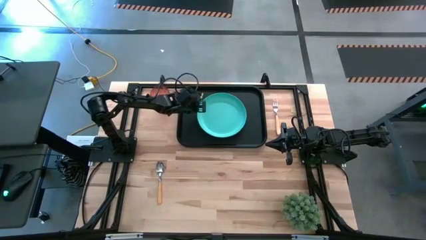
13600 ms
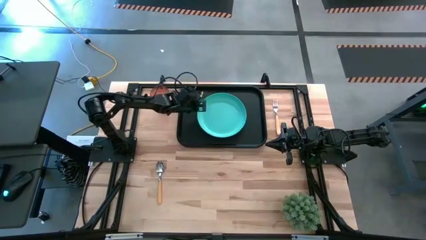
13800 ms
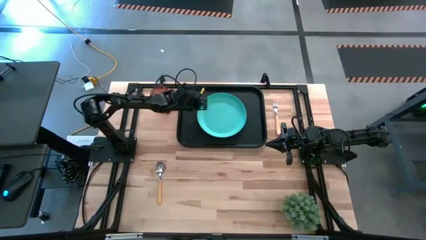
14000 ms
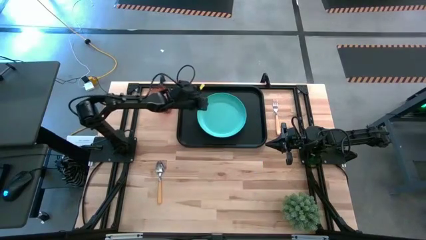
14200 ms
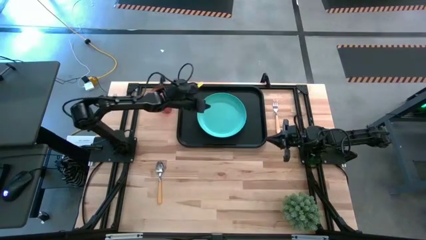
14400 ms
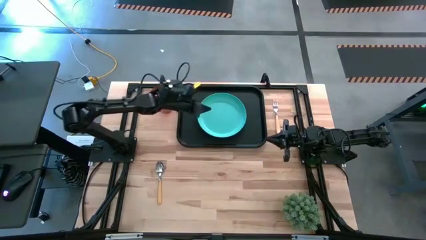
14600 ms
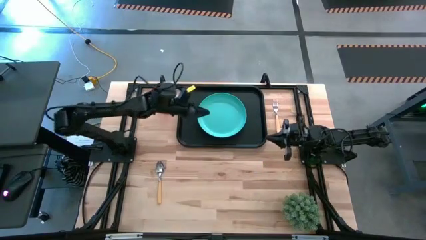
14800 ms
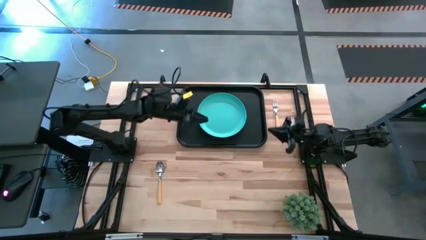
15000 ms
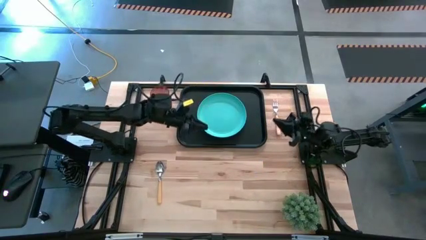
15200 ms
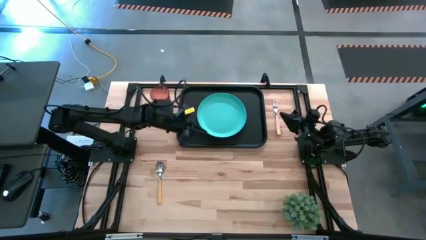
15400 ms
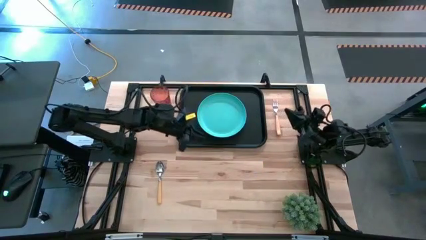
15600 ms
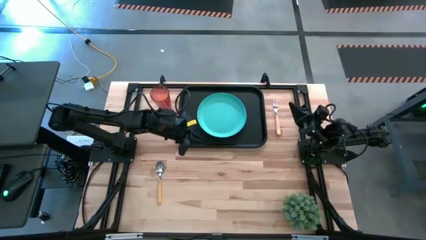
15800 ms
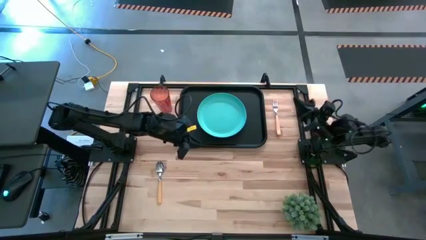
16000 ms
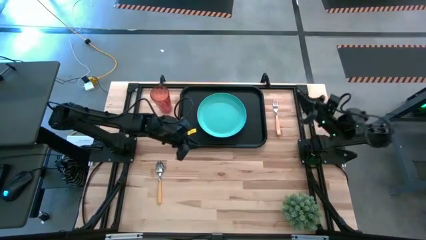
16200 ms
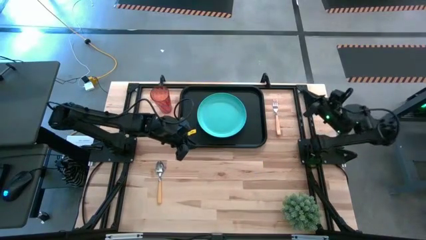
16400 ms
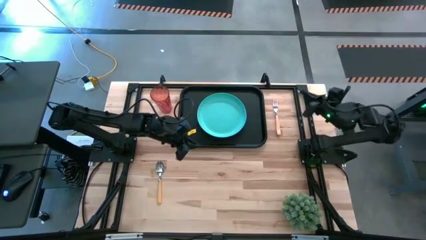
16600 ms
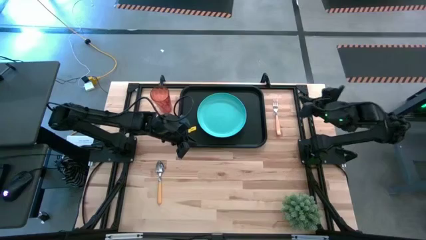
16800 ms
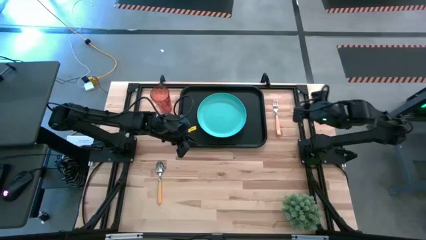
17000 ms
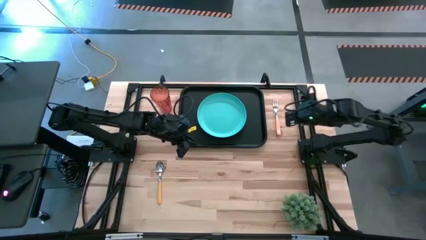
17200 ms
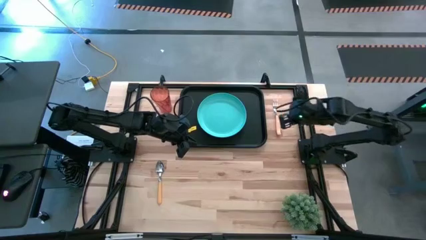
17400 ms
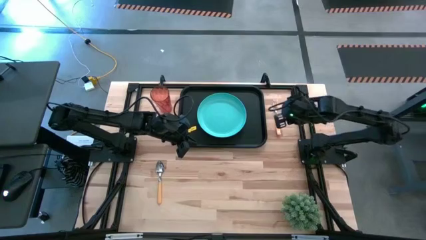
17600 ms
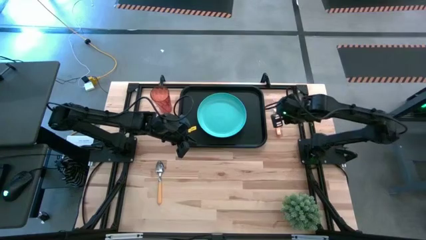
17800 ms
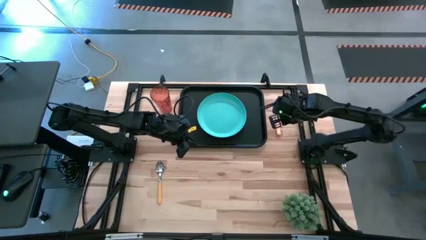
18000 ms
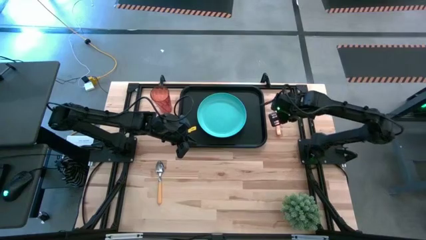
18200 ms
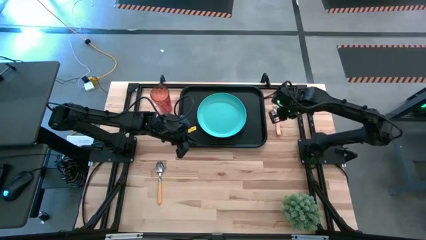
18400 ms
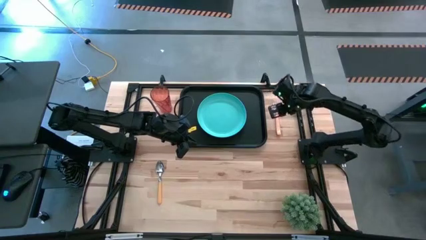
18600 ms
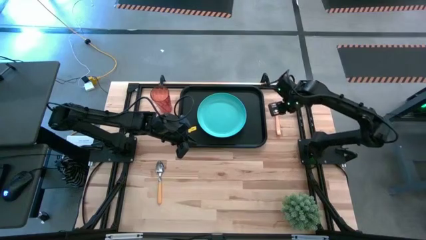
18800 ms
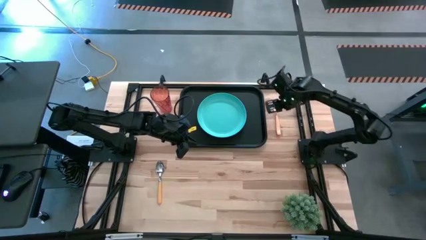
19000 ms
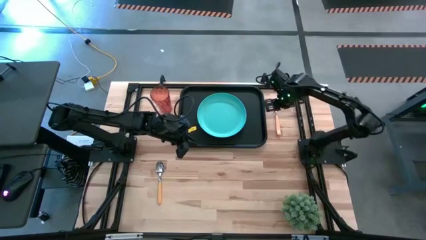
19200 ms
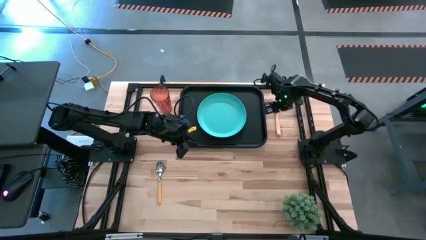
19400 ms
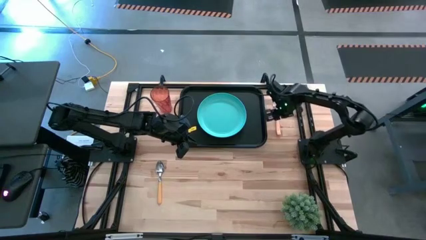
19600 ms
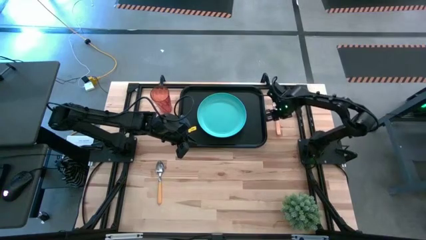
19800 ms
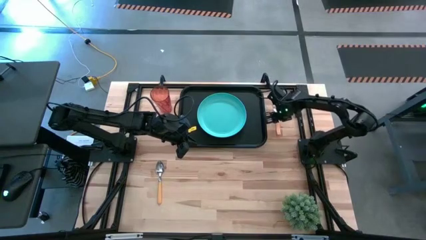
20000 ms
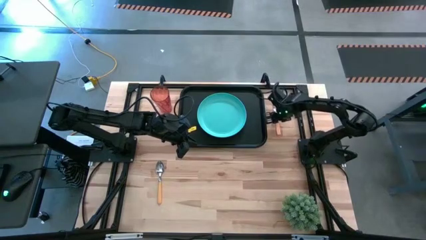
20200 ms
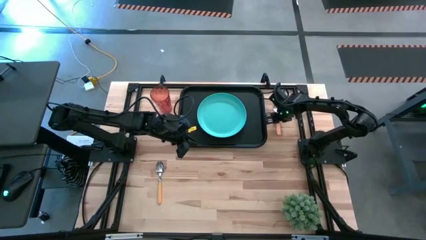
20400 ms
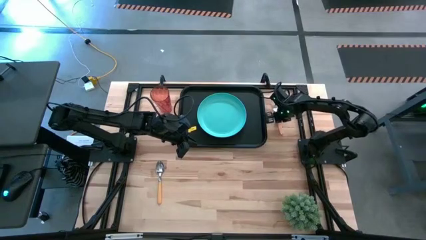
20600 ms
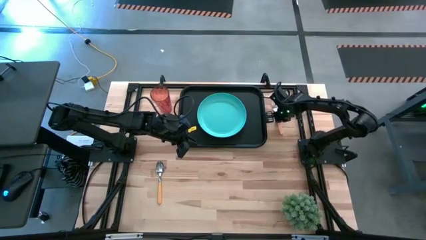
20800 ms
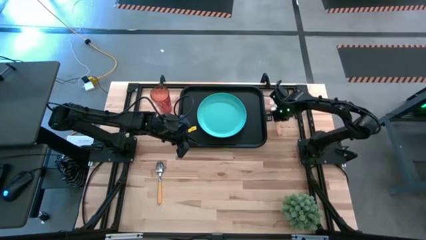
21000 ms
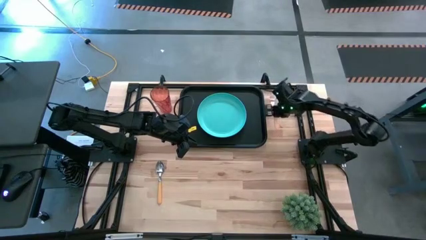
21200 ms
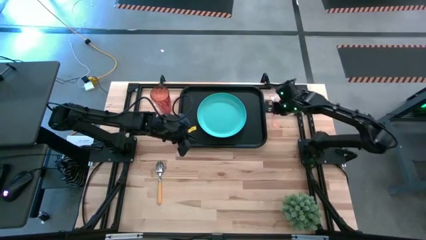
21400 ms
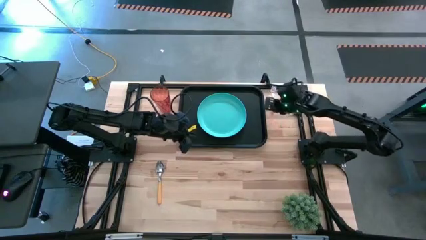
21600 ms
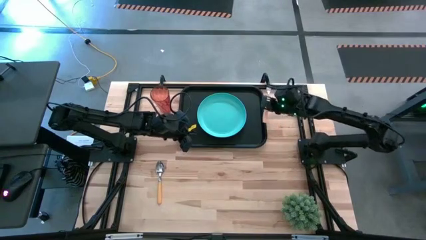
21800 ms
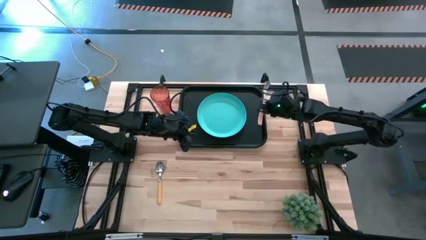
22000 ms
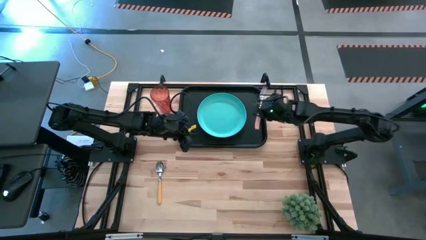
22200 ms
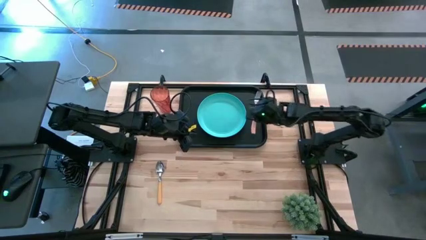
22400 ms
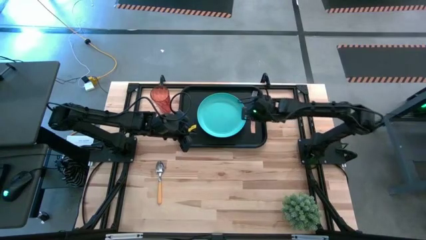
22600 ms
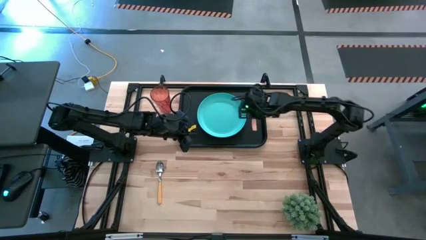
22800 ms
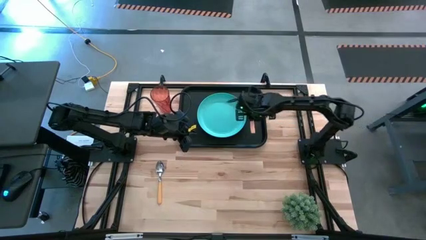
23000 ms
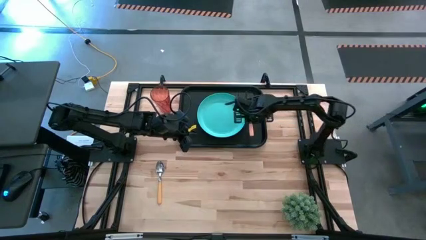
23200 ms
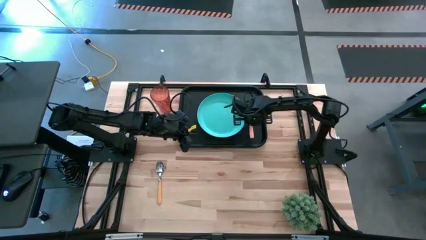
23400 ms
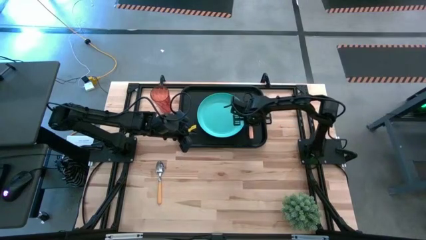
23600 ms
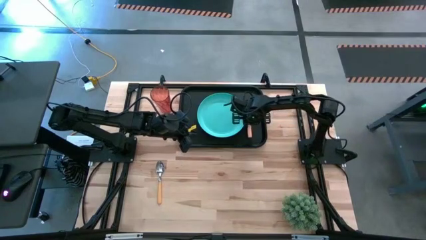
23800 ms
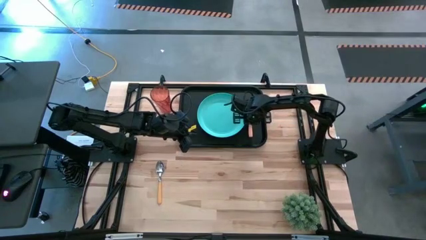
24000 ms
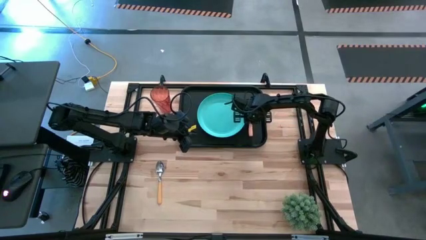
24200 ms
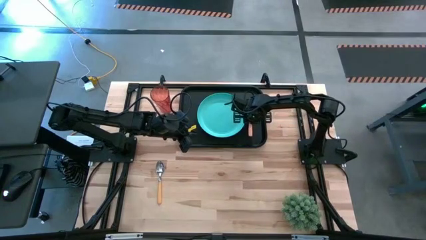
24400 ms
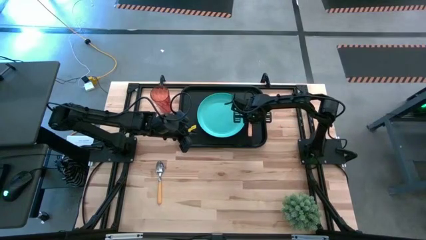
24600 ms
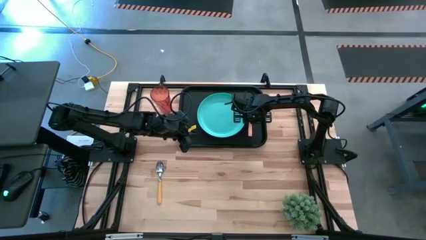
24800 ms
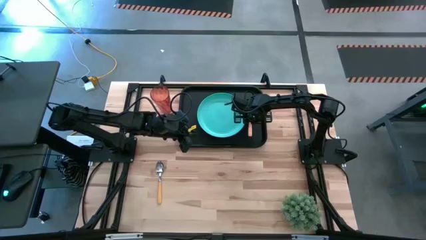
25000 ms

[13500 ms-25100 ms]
Task: Pick and place plate/cup/fork/spoon on tray
Put the orange fork on the black serving tray to the right of the blue plate

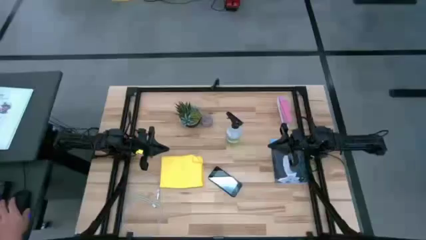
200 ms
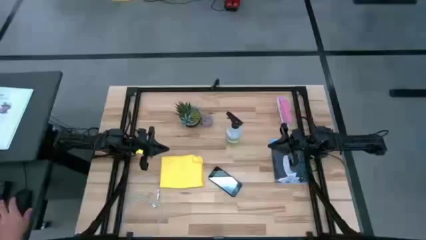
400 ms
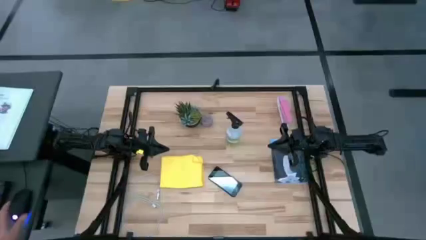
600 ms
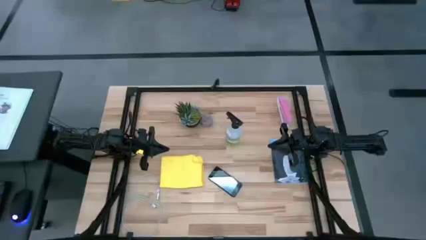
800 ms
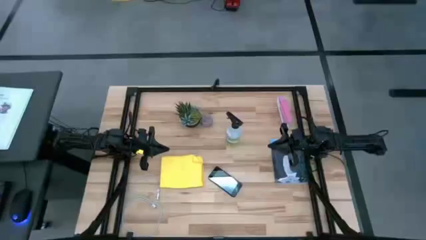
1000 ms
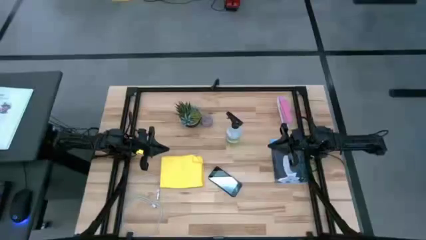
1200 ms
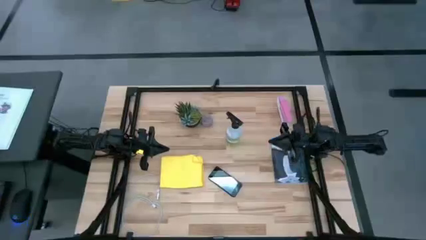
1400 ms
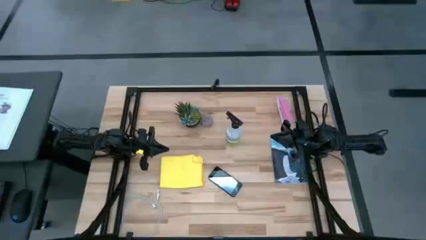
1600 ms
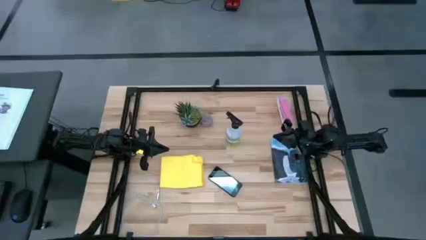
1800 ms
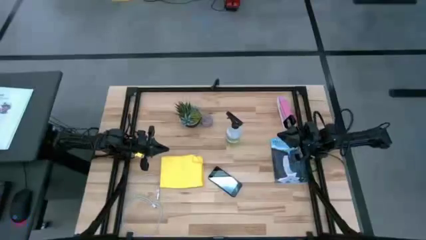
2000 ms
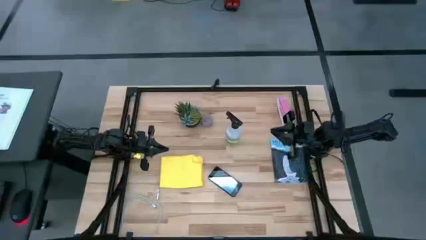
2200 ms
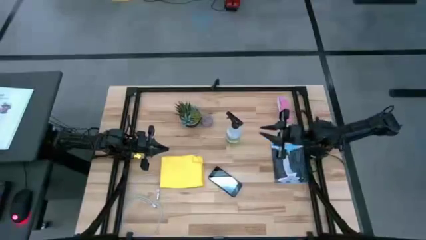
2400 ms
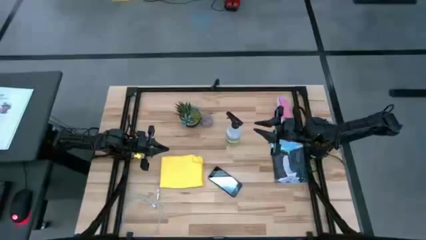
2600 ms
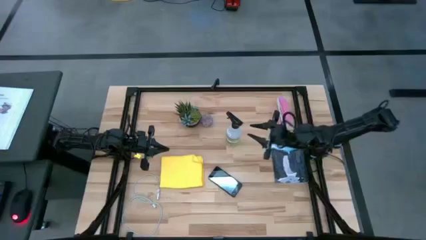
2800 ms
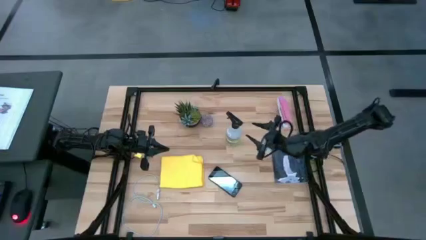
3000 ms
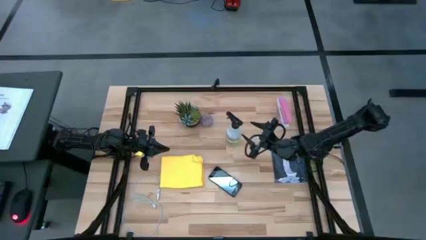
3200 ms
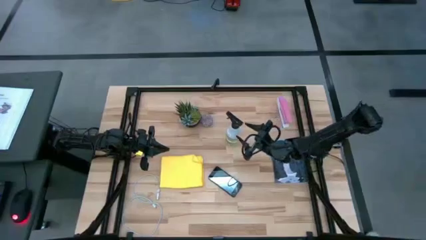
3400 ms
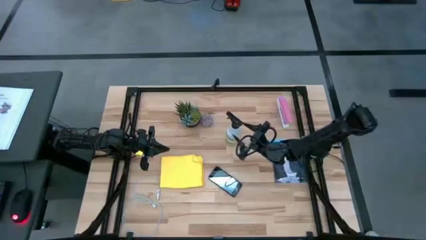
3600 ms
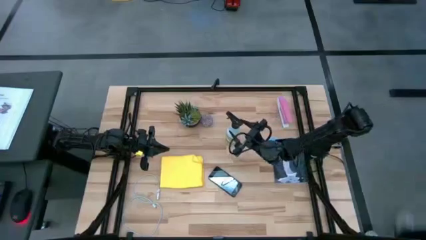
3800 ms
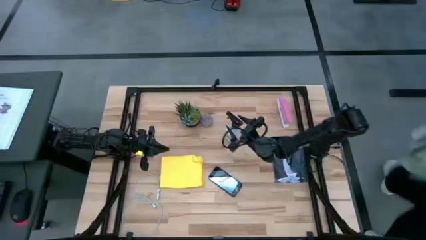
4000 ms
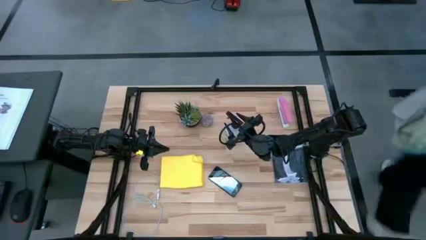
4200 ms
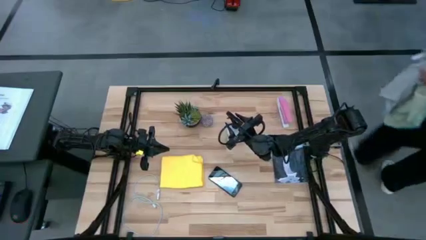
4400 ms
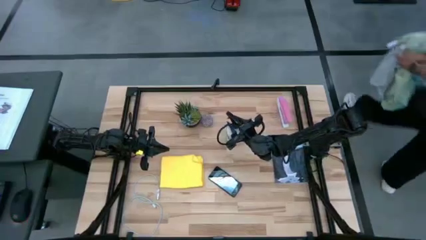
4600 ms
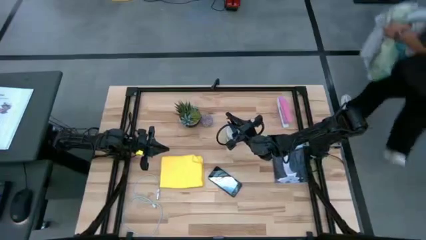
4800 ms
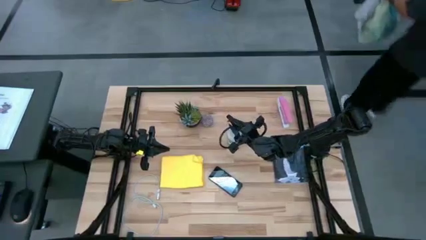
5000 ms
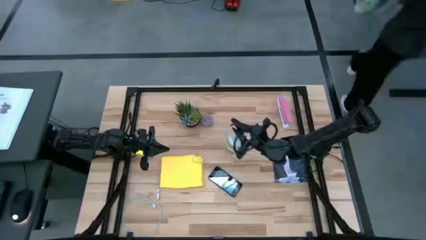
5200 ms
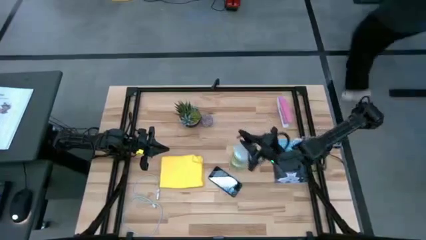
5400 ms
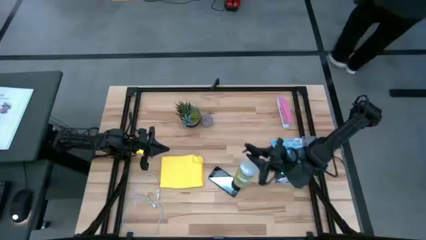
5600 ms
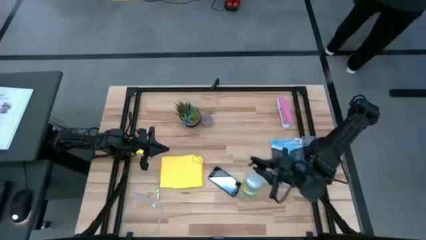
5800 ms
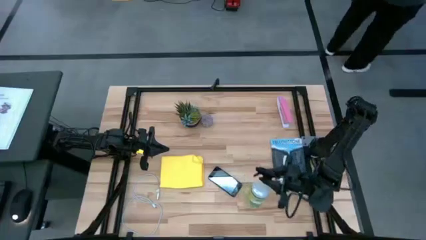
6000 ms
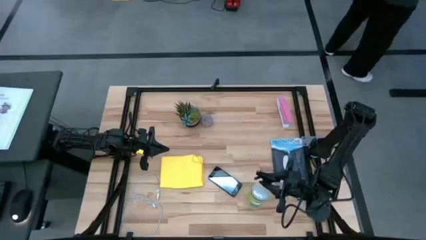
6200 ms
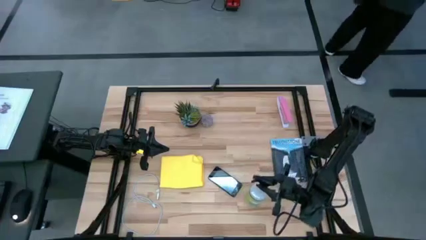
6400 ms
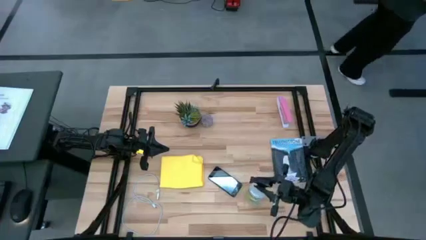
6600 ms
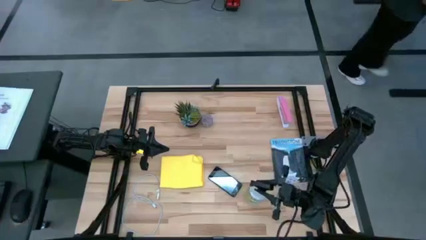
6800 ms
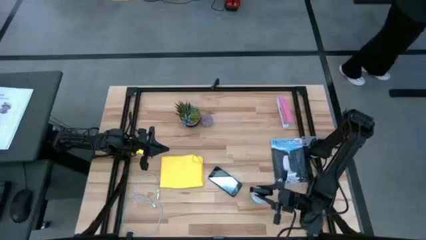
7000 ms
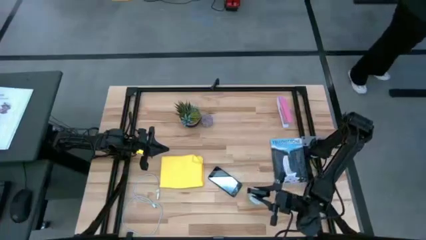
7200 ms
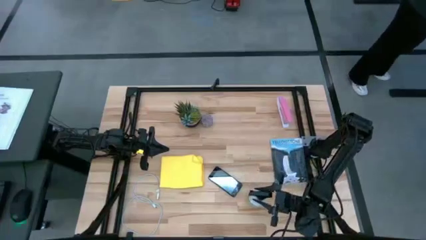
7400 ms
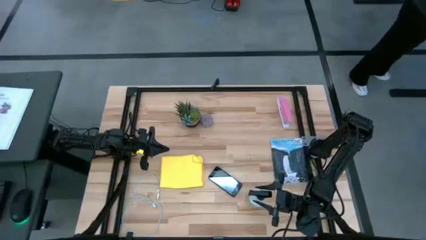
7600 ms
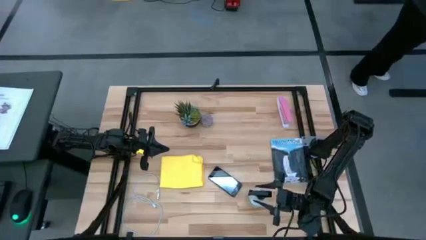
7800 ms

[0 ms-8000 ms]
Task: Apply microfiber cloth
Move the white spray bottle to the bottom left of the table
